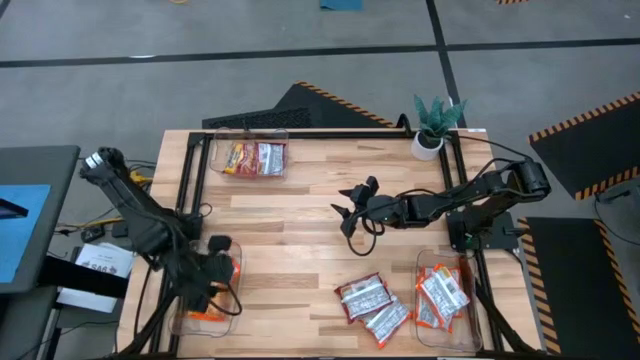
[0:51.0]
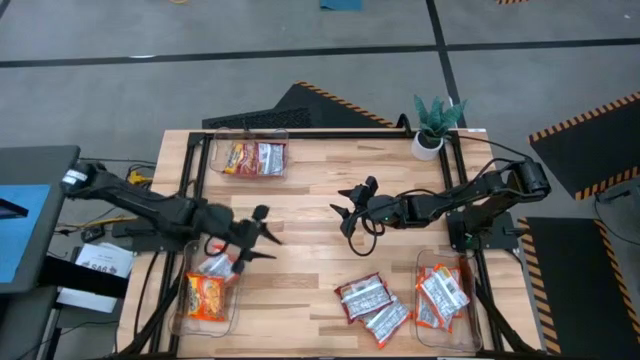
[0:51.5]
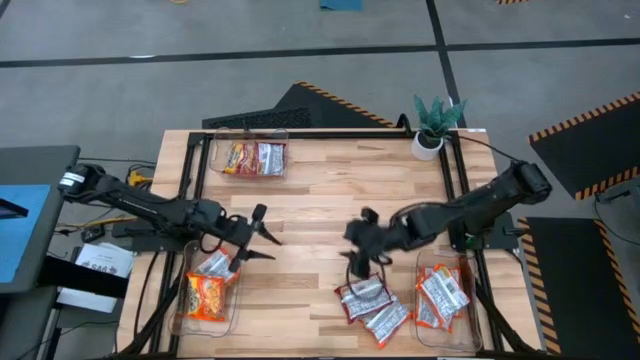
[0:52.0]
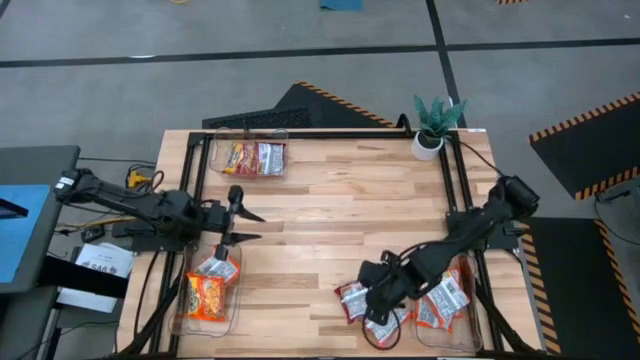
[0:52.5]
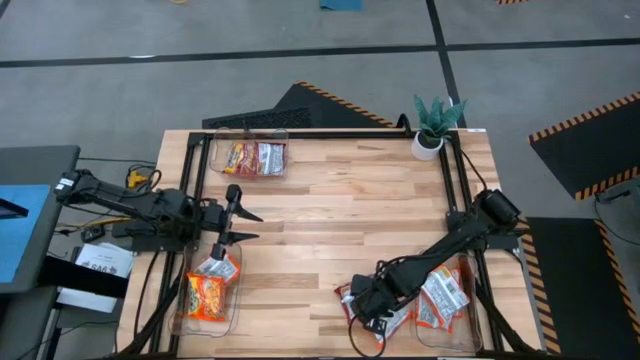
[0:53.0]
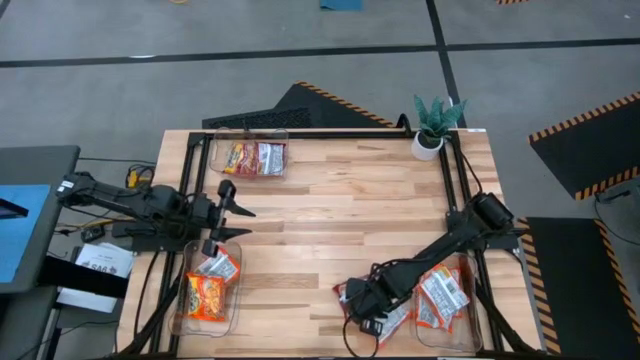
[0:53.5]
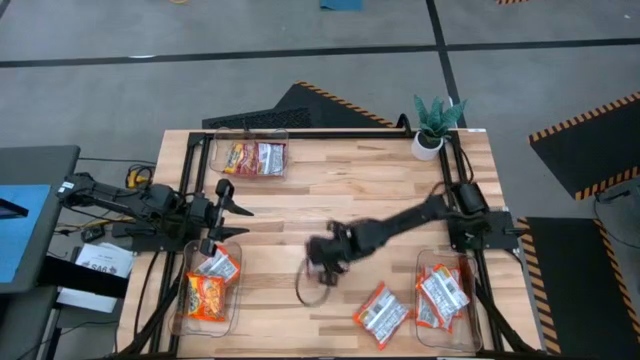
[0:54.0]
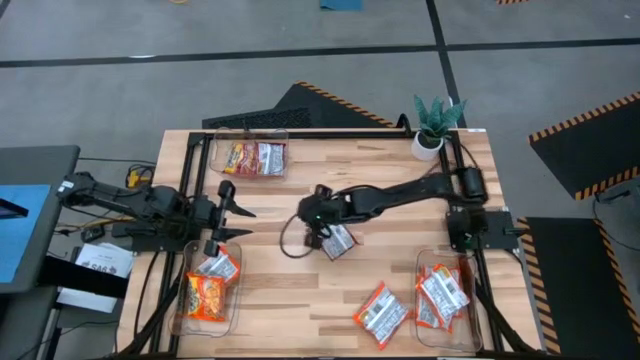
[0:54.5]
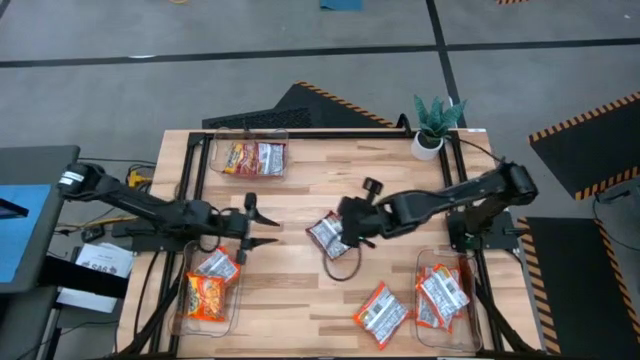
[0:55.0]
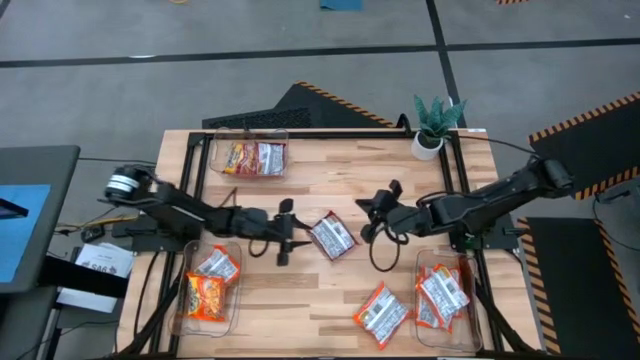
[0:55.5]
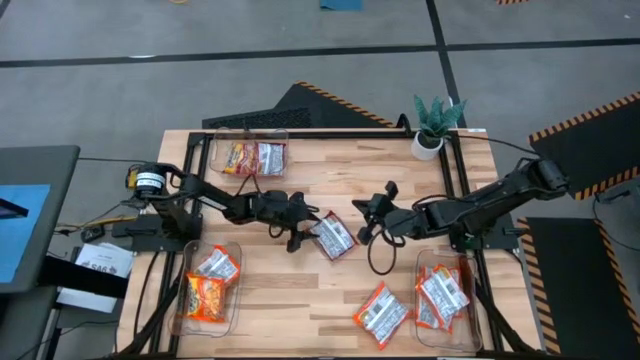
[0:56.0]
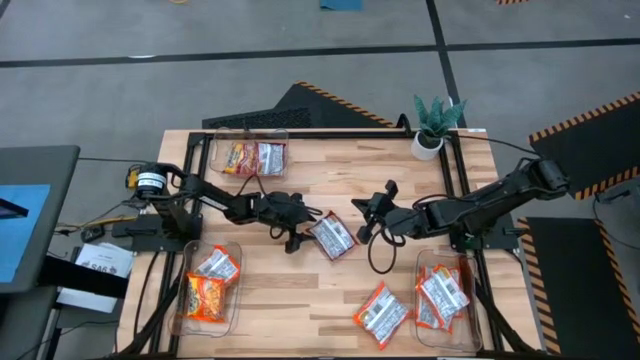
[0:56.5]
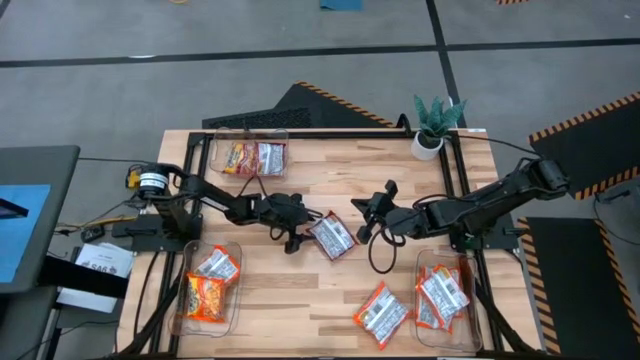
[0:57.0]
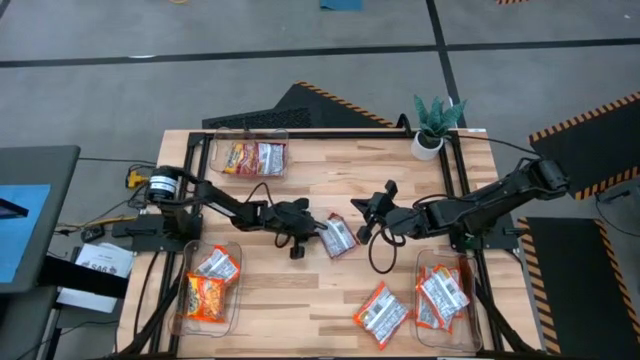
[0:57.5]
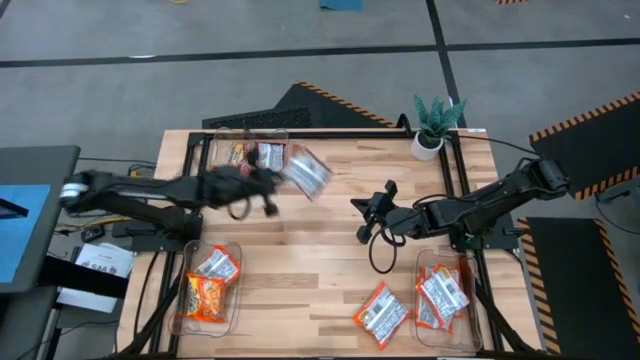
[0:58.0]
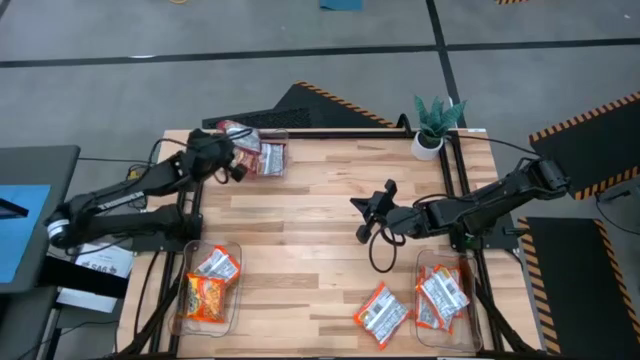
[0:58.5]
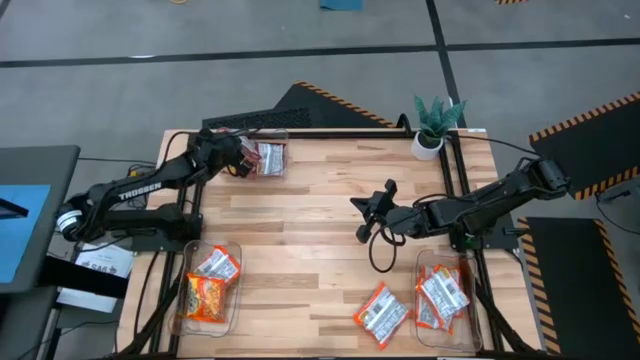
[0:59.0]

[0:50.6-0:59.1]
Task: Sort Maruchan noodles
Put the noodle pack into the top left transparent bin

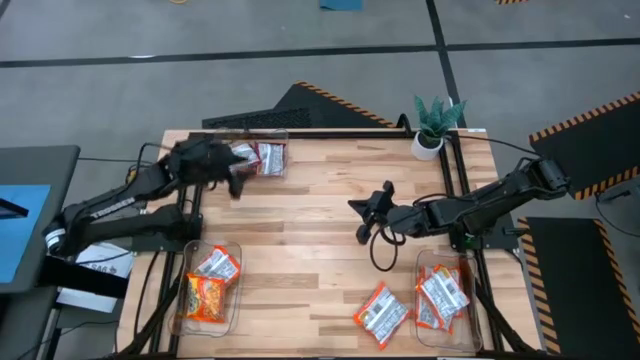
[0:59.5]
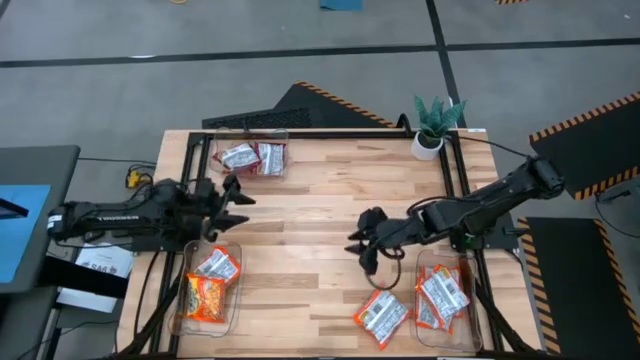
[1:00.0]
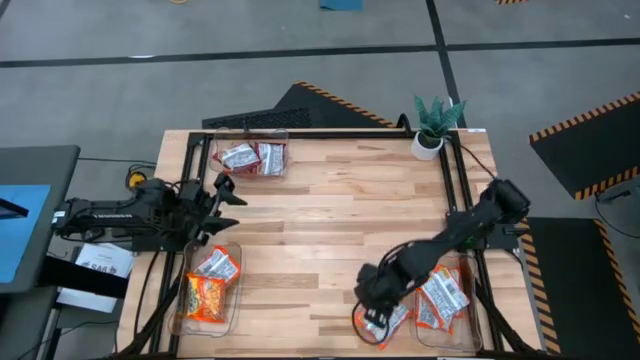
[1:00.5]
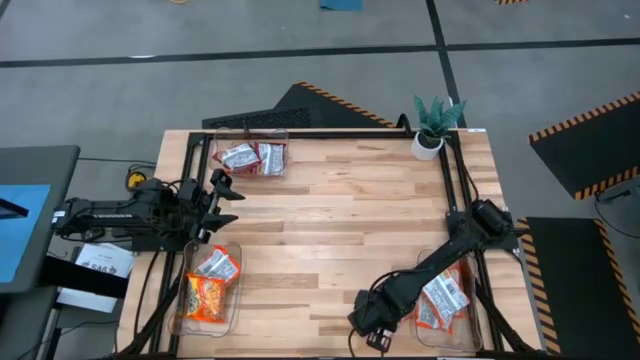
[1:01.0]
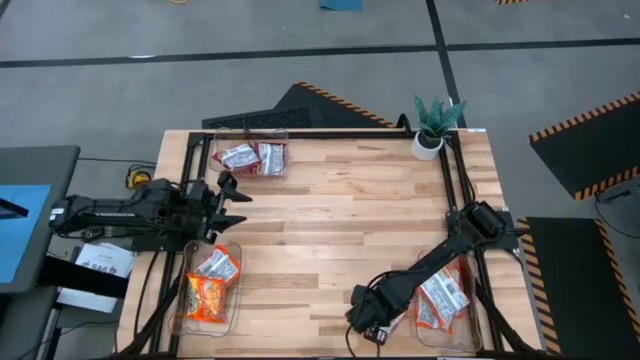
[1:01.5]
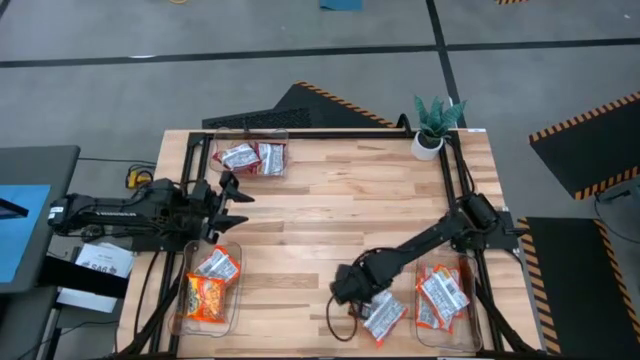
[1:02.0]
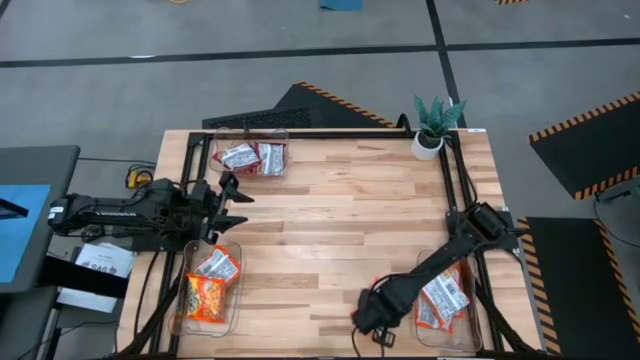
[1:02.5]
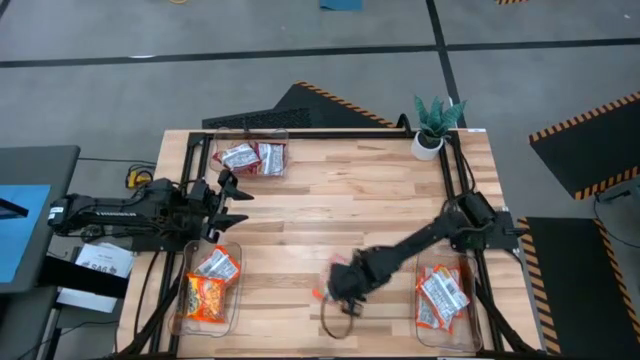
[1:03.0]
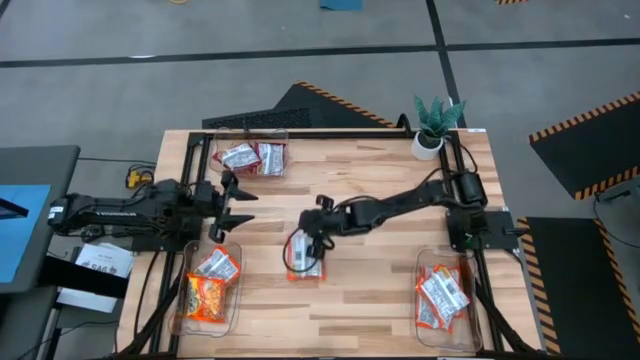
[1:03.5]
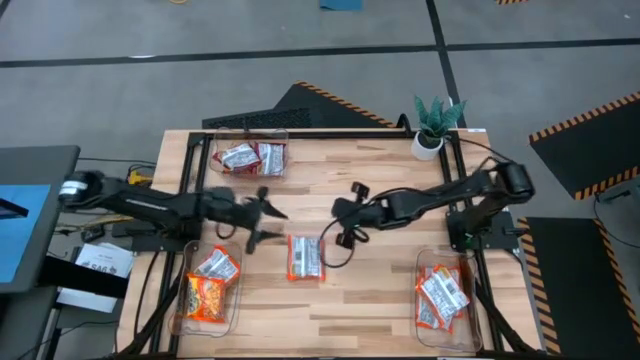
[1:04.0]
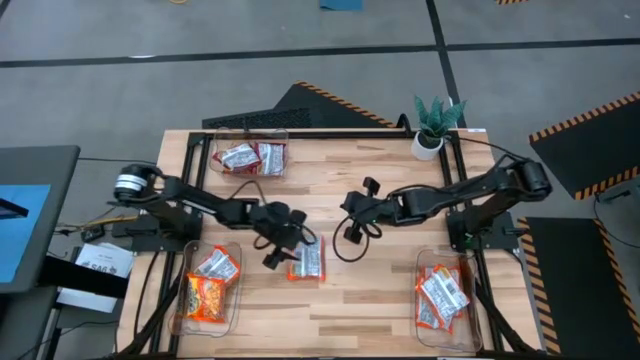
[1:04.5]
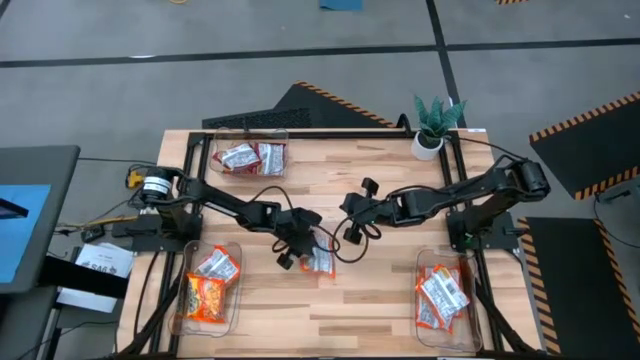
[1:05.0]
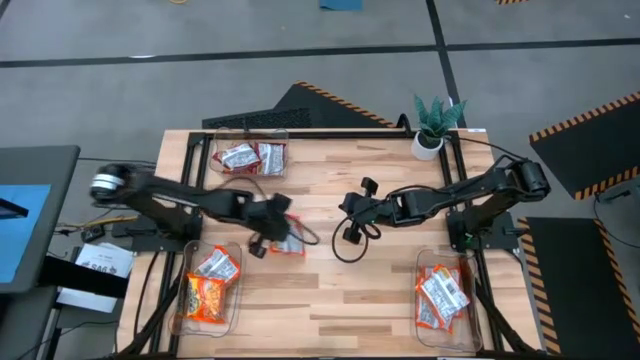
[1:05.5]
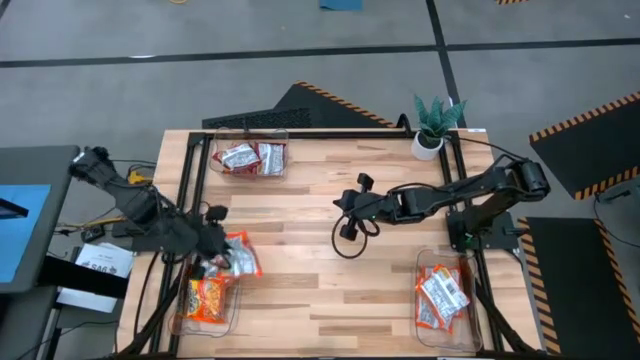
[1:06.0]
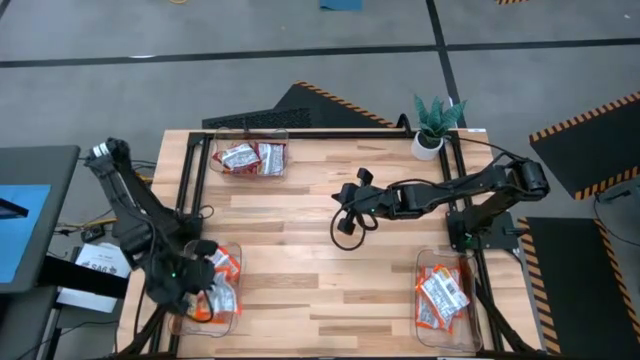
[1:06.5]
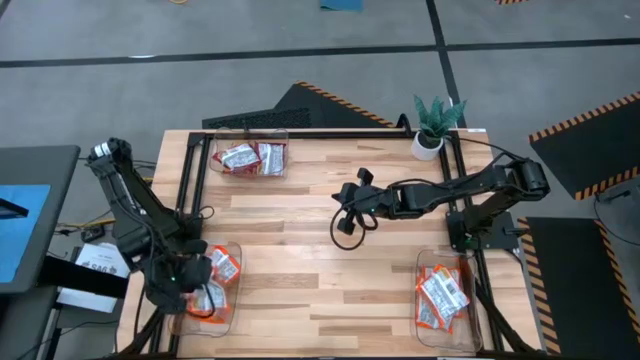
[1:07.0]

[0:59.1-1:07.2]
Put the orange noodle pack into the bottom left transparent bin

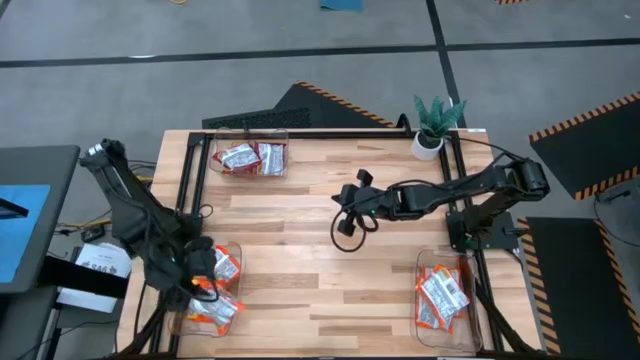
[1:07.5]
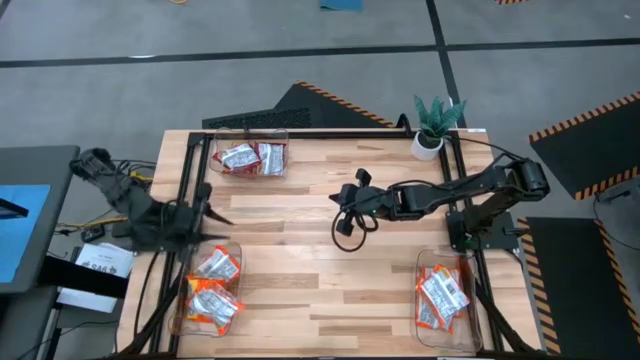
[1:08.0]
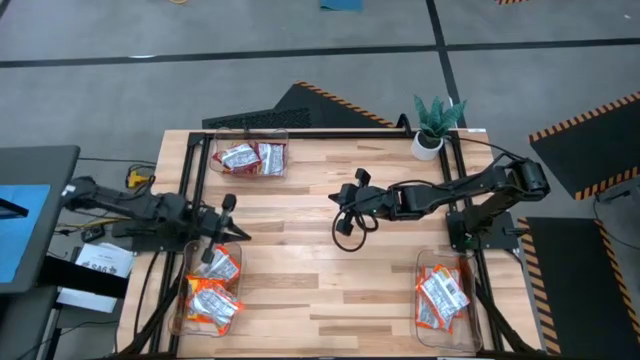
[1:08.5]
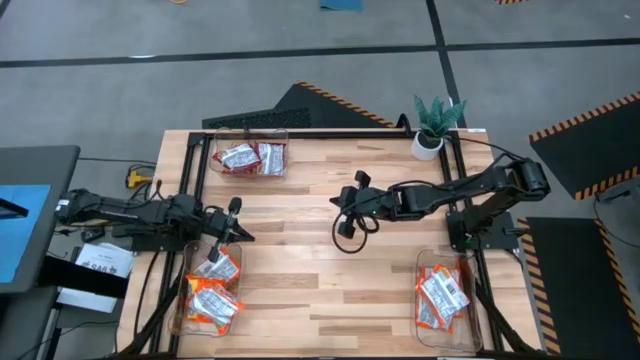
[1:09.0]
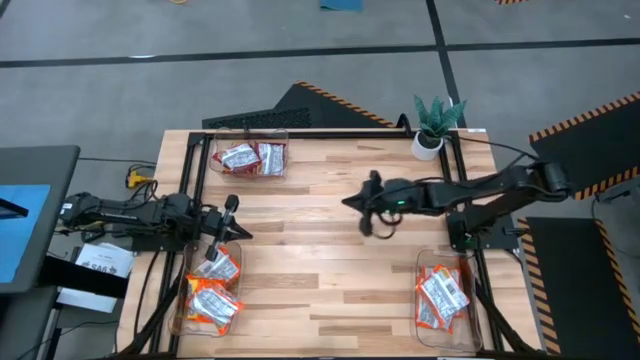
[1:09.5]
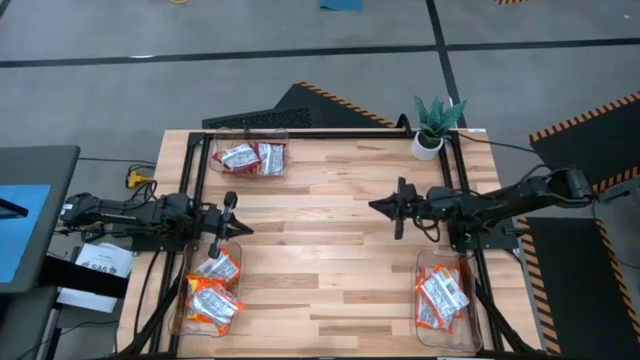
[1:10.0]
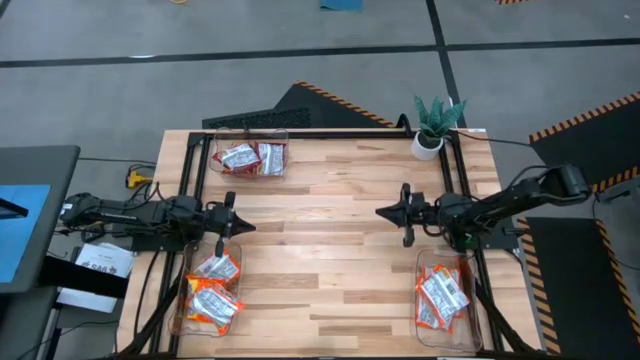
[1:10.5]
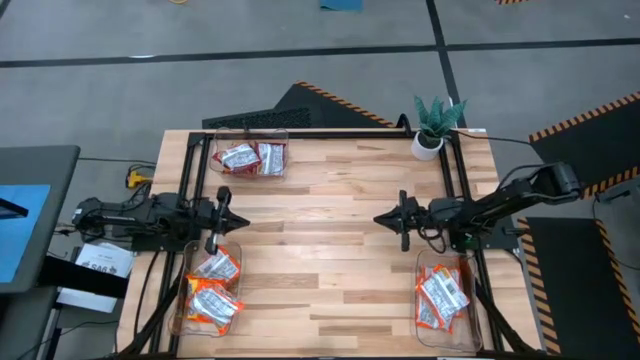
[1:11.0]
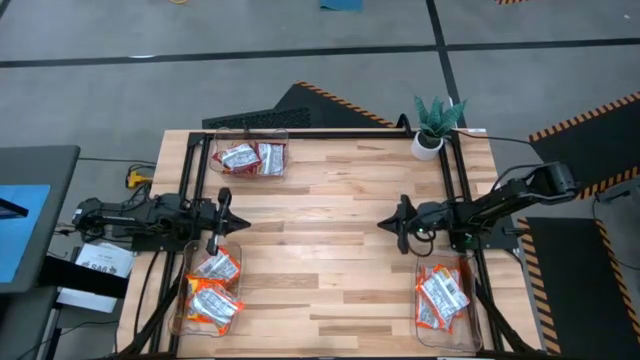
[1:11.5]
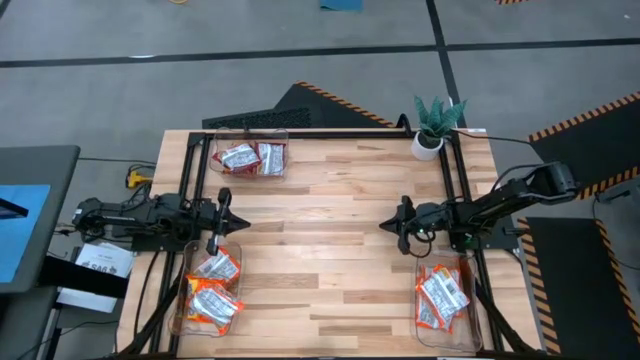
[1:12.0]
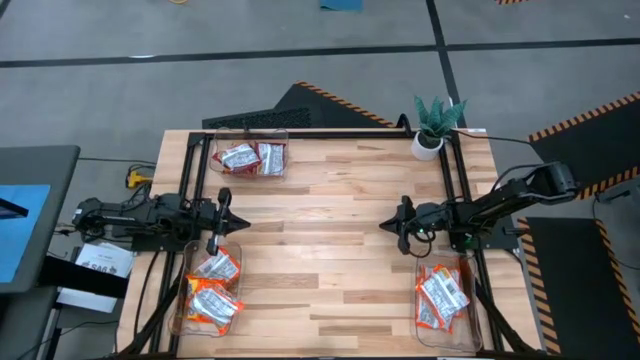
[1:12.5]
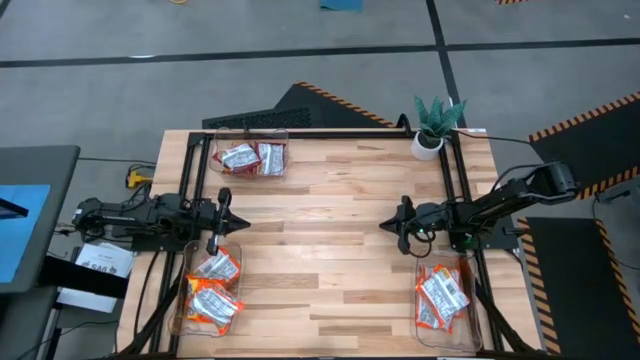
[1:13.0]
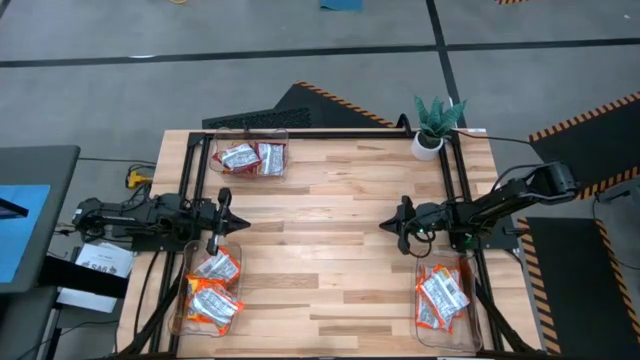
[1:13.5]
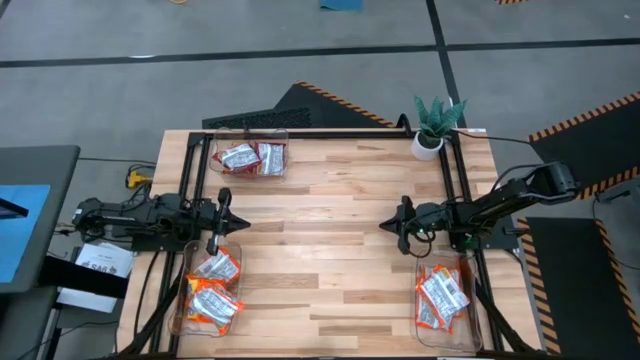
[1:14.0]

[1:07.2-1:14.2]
Return to Home Position
